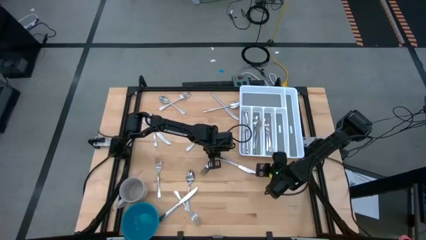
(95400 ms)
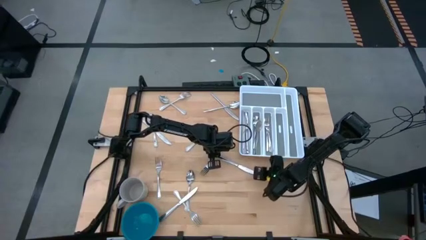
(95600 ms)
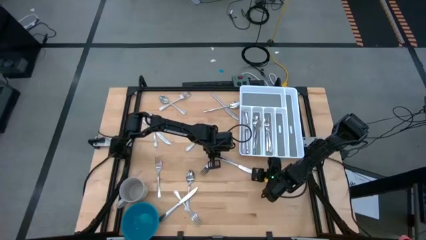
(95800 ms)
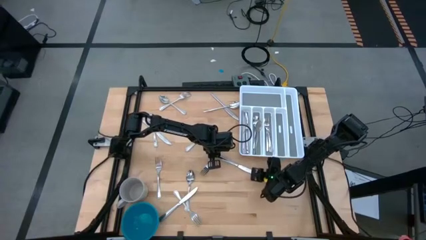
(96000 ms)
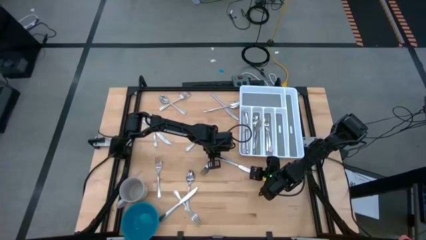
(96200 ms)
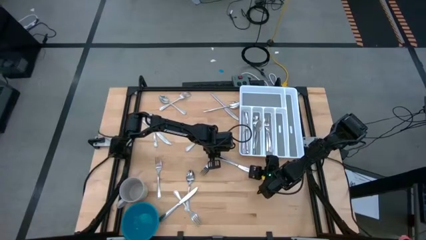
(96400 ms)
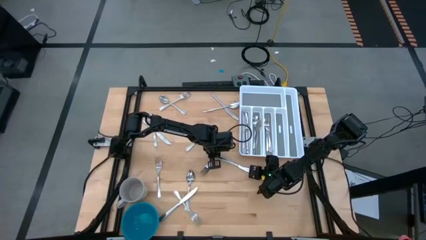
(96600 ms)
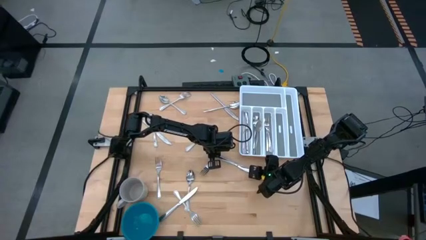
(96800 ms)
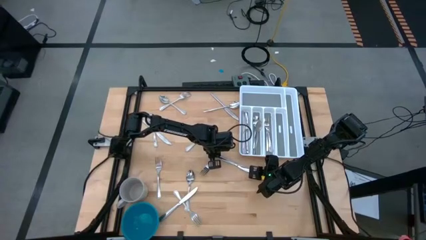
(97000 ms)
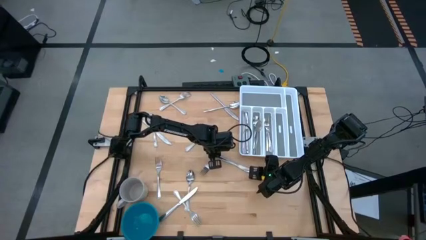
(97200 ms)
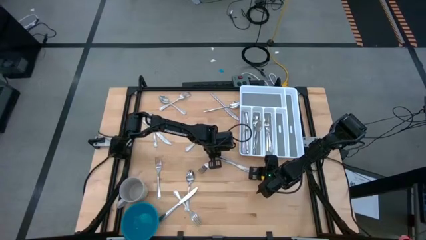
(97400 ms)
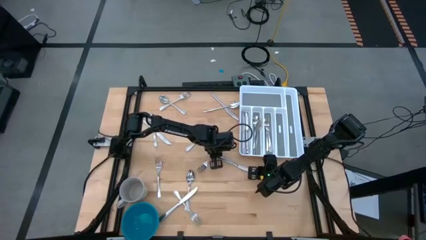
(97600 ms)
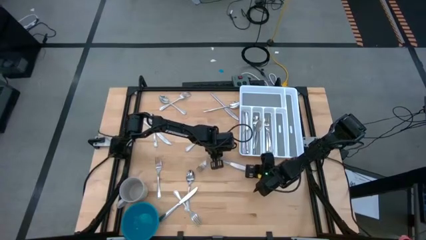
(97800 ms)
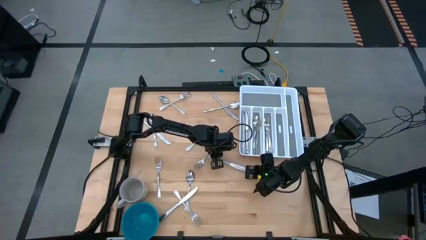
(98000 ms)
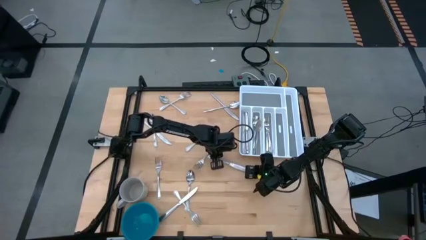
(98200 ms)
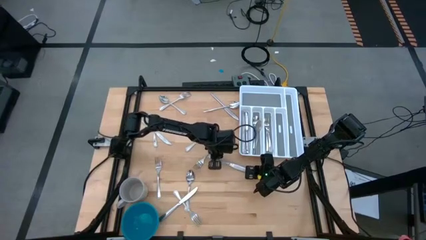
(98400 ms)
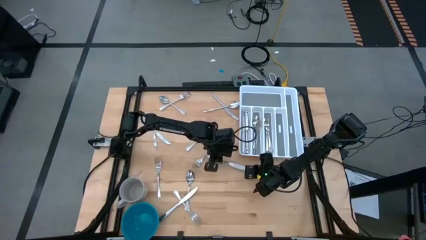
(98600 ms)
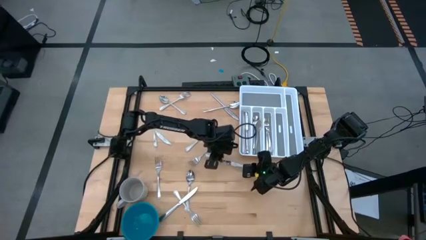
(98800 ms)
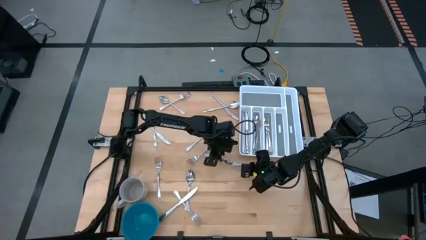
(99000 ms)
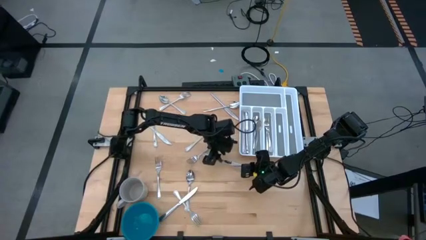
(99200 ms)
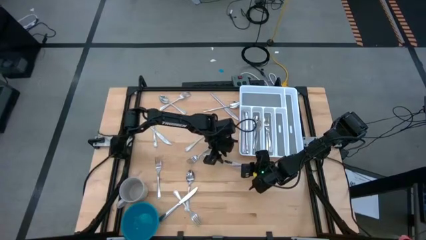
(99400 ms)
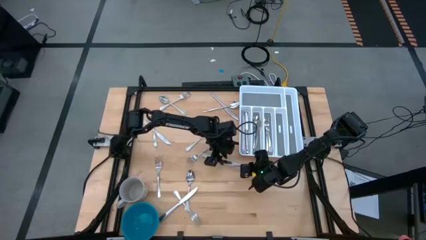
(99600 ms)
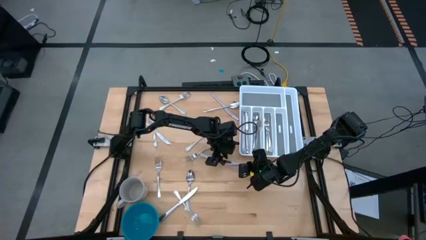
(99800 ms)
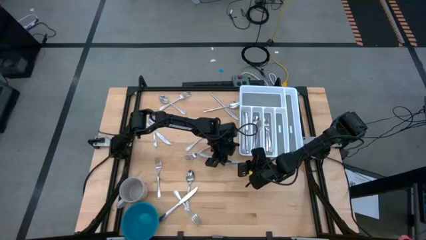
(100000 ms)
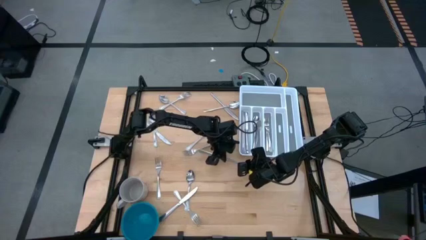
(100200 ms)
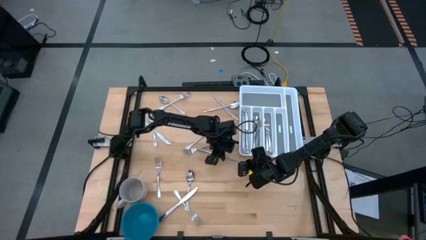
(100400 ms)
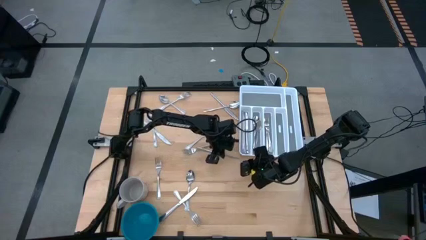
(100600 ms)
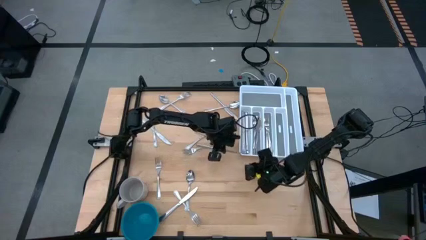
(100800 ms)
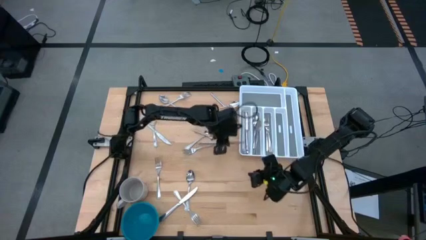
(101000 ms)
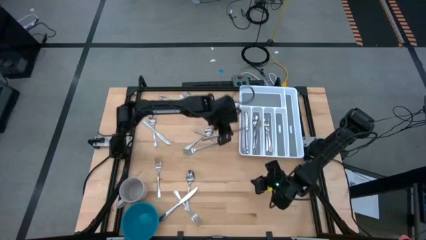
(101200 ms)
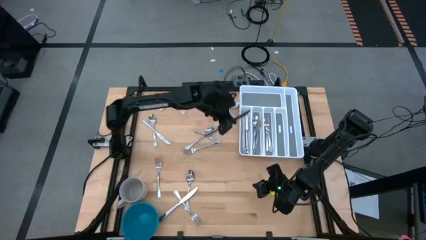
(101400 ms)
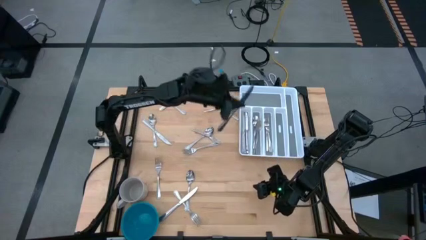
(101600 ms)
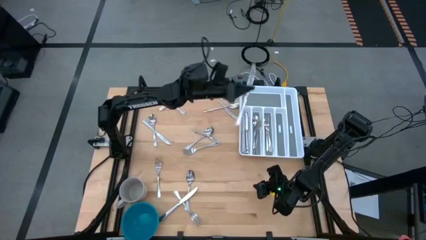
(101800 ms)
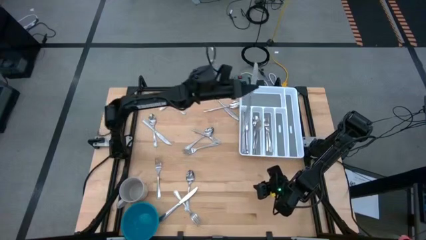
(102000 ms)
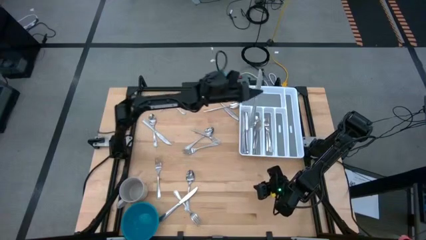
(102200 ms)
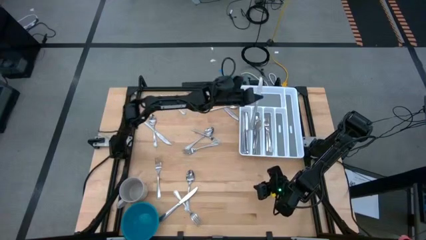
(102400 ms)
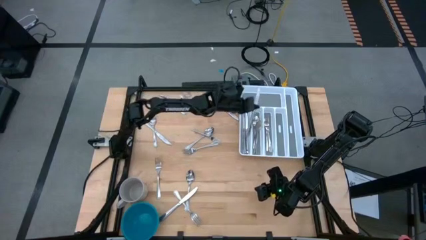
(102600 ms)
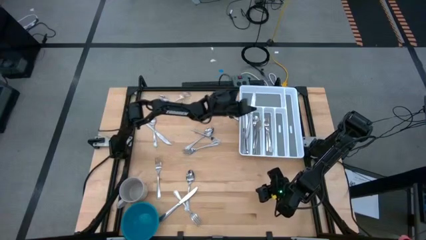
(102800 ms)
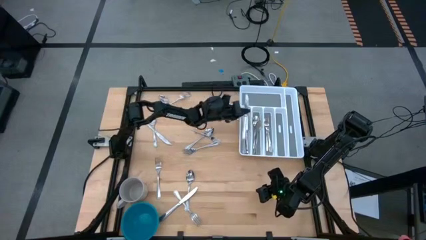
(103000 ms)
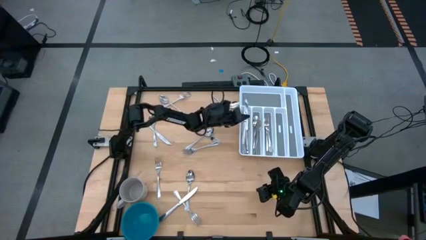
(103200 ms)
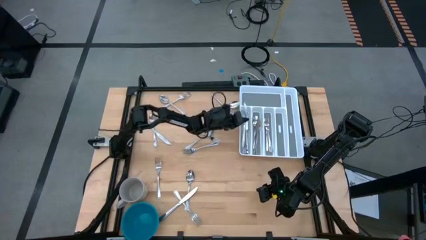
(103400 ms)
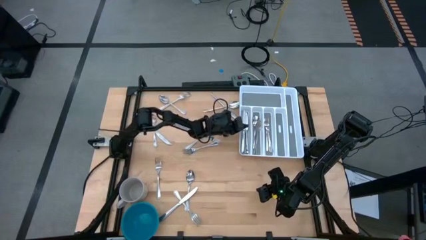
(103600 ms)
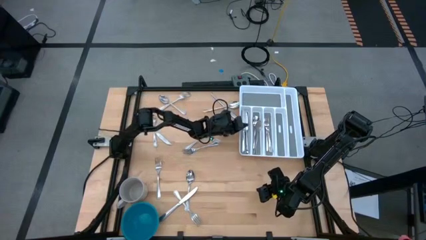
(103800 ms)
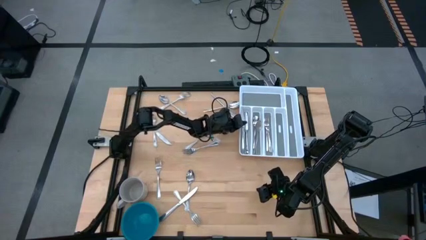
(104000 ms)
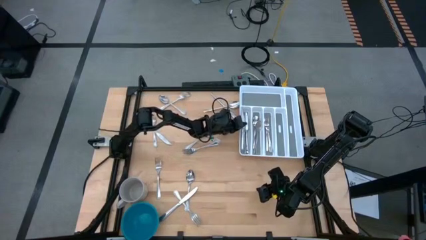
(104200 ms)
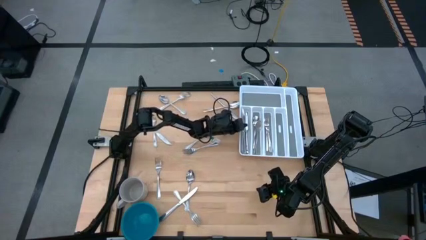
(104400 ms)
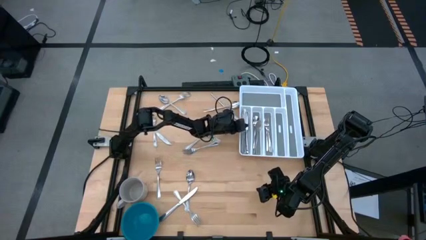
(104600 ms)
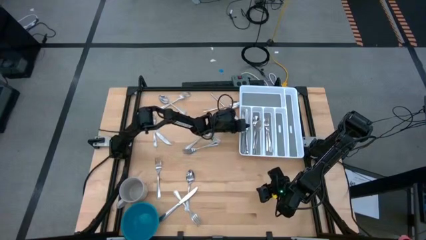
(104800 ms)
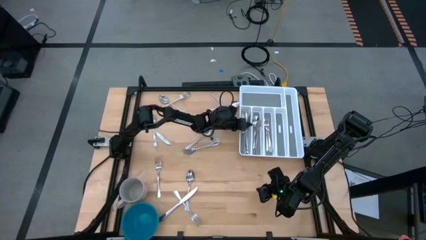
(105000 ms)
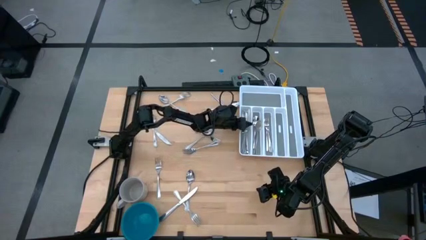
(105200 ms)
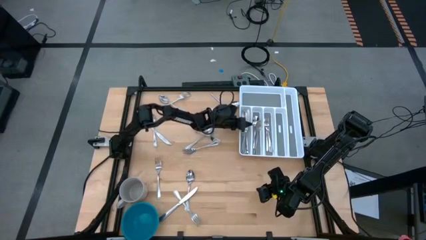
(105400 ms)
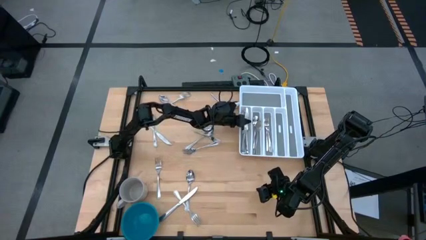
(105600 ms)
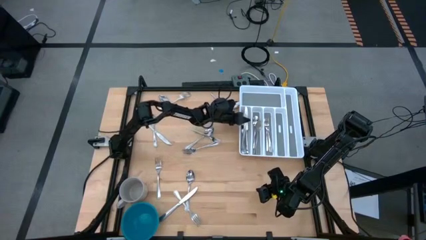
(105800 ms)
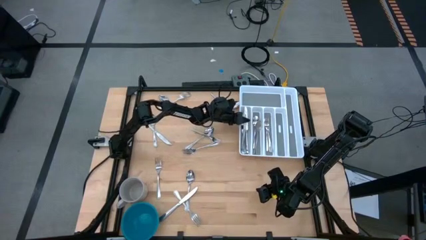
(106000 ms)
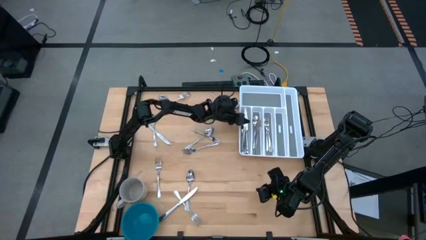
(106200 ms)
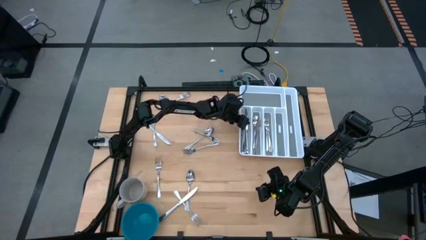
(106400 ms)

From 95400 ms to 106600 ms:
Task: Sort silverware
Put the table knife into the silverware tray

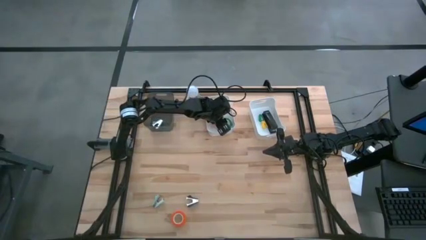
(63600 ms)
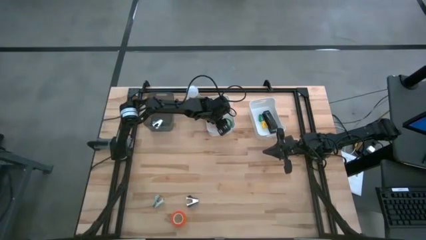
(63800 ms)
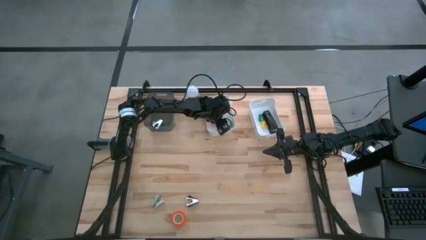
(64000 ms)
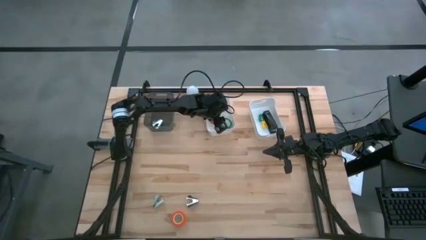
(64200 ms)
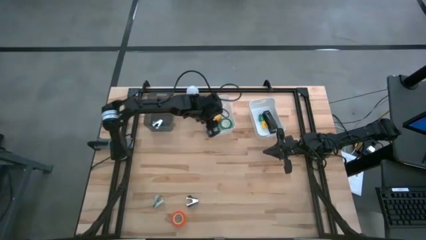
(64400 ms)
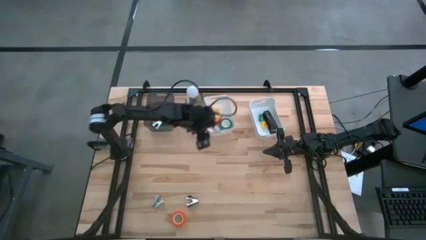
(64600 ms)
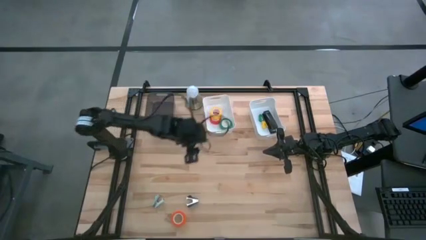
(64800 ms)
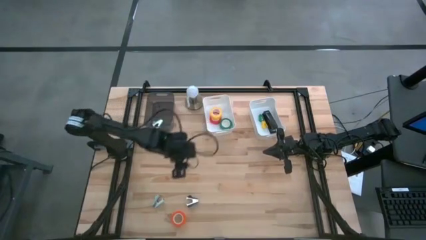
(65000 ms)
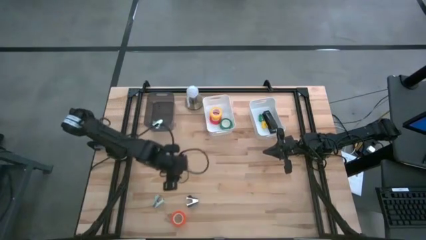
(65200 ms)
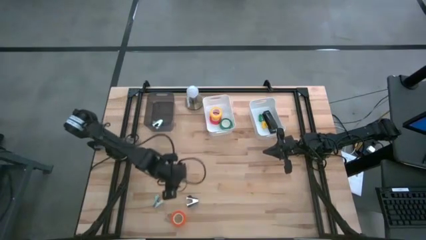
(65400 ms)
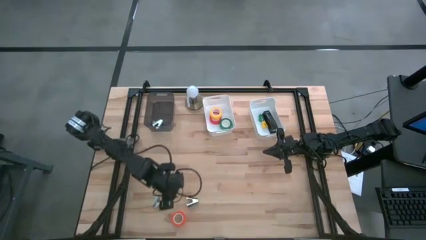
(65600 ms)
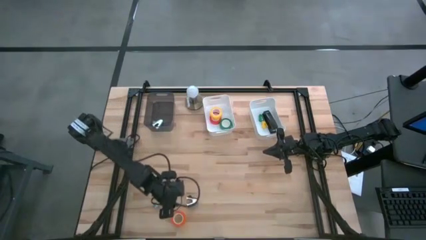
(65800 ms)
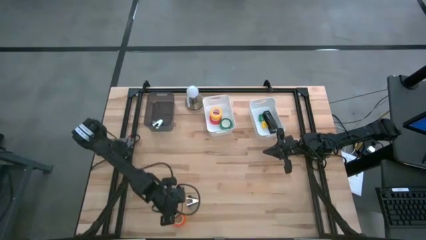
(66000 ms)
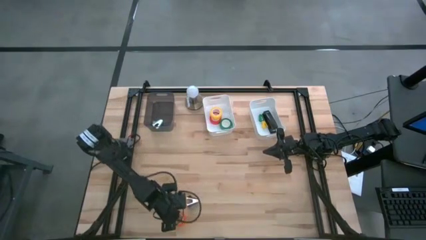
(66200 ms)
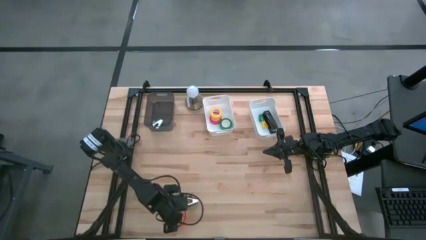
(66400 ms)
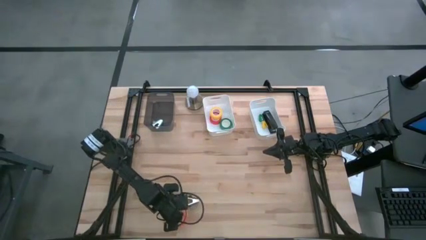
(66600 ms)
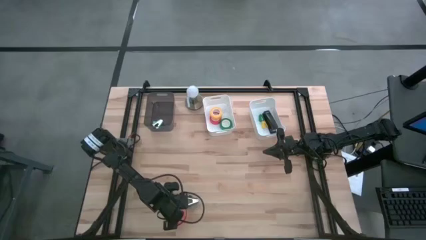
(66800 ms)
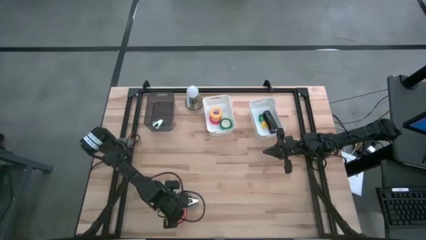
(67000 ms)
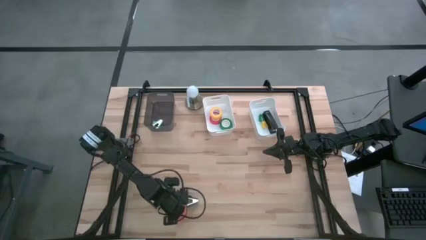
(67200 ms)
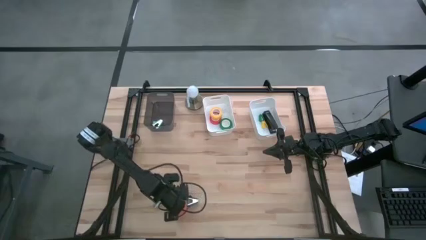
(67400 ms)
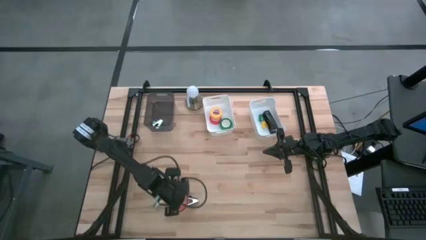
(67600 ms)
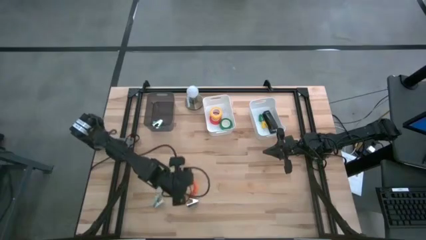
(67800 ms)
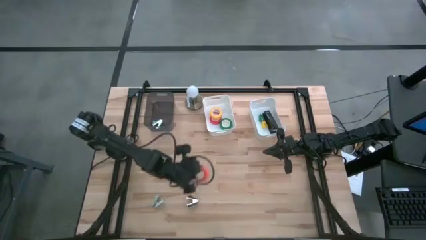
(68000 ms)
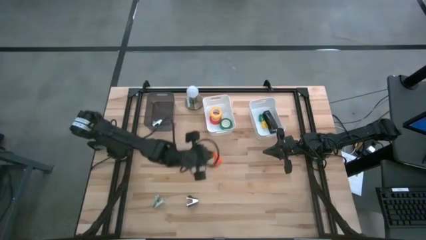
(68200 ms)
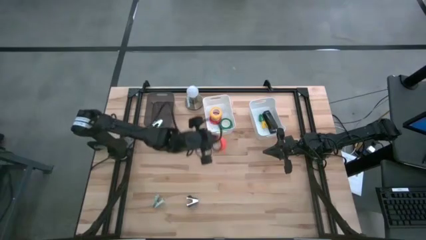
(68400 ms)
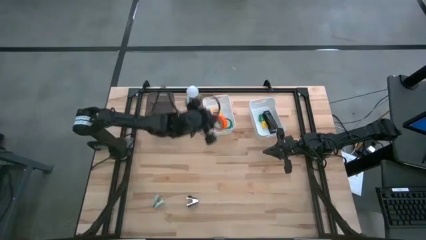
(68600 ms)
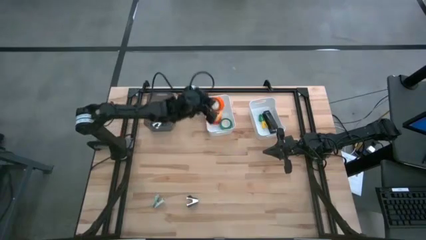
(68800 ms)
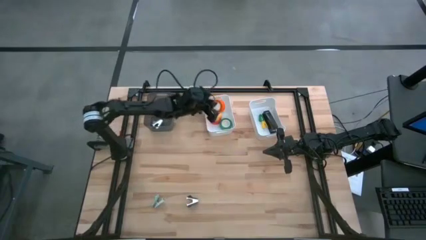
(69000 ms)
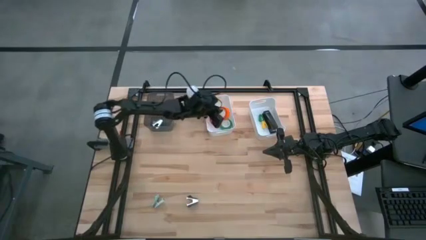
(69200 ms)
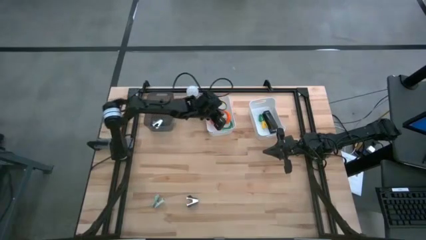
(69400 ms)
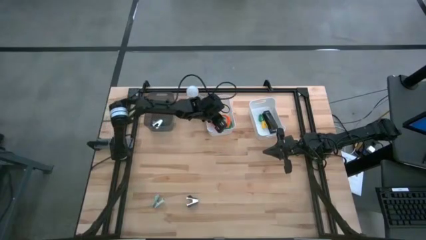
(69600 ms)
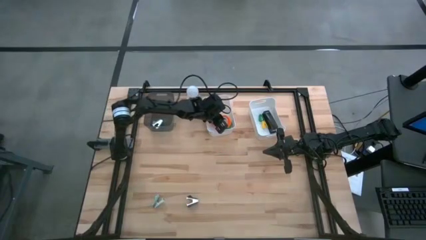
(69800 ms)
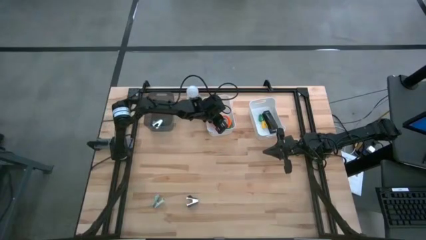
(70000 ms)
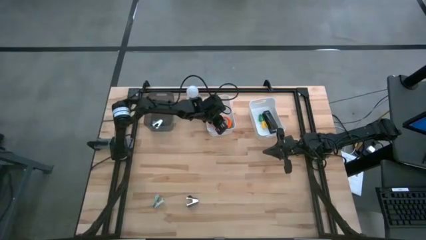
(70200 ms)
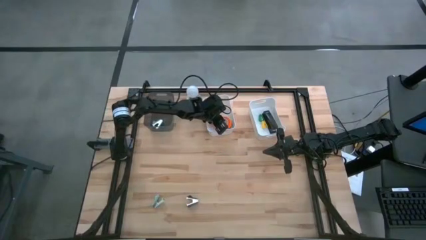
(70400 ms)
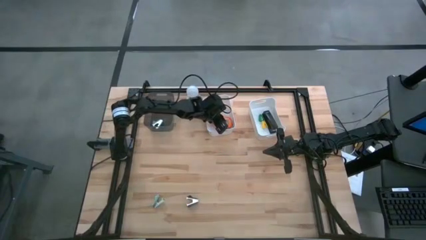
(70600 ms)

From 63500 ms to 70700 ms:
Task: Pick and place Stapler, Stapler remover, tape
Put the orange masking tape into the left white bin
